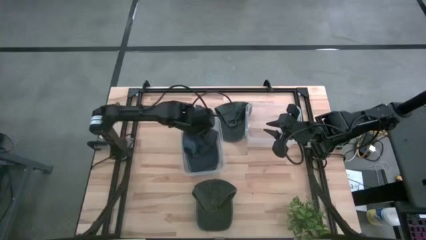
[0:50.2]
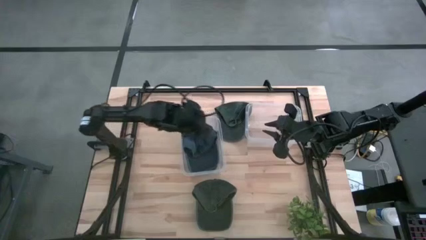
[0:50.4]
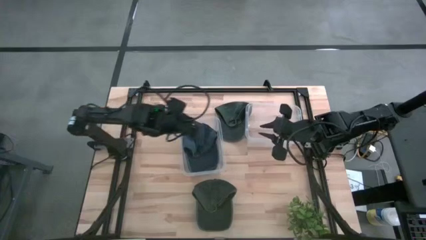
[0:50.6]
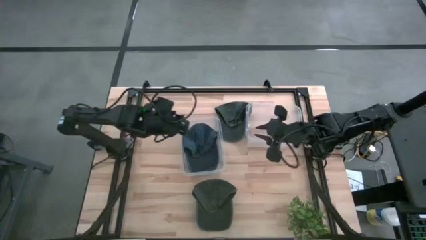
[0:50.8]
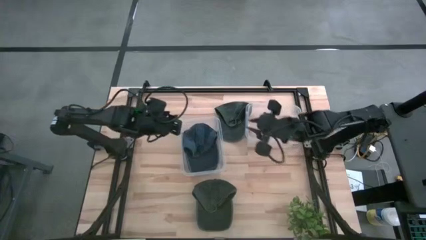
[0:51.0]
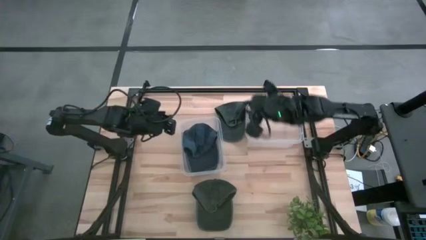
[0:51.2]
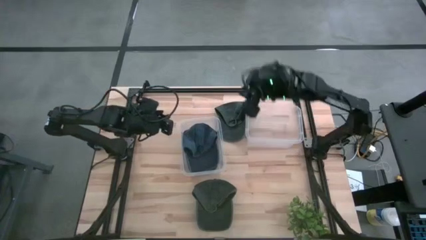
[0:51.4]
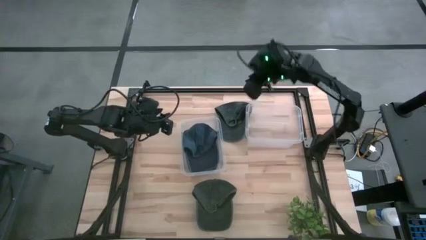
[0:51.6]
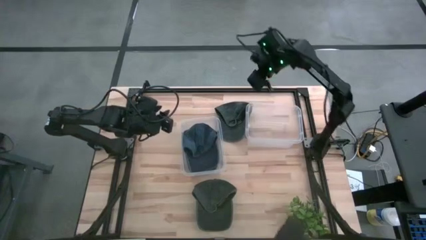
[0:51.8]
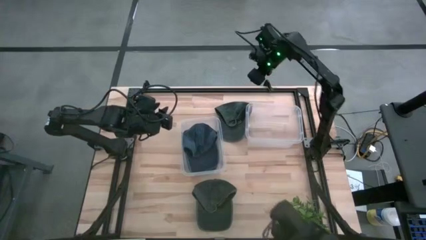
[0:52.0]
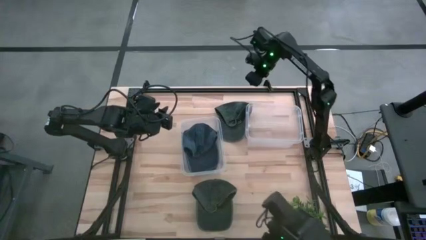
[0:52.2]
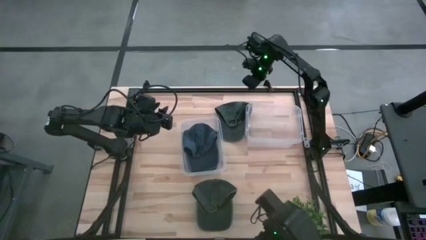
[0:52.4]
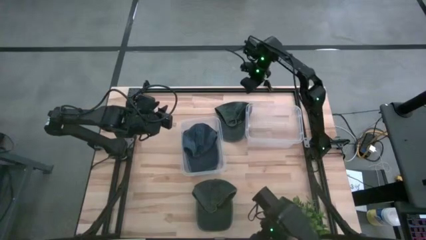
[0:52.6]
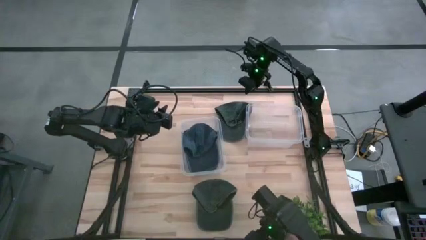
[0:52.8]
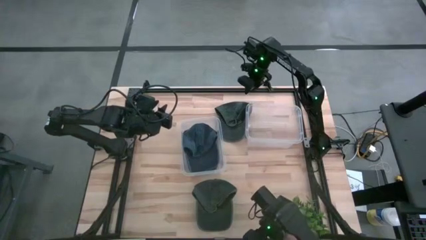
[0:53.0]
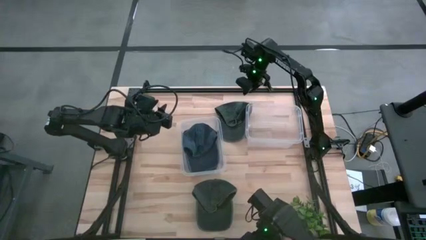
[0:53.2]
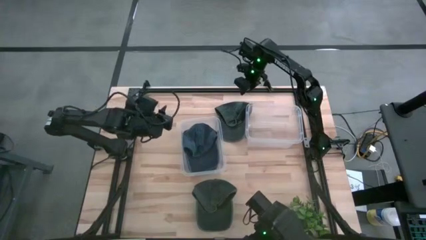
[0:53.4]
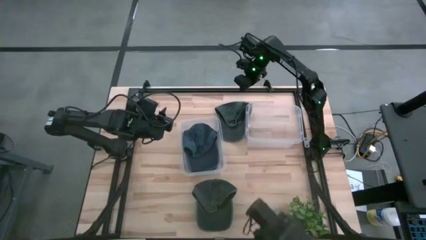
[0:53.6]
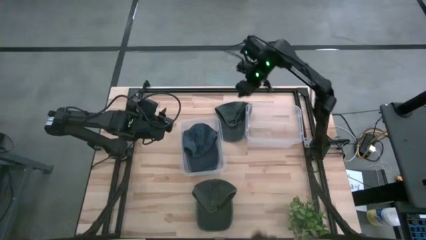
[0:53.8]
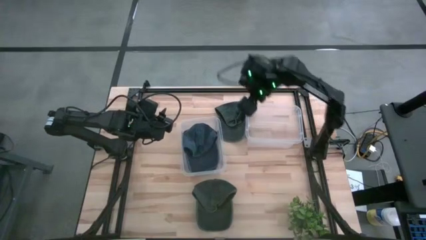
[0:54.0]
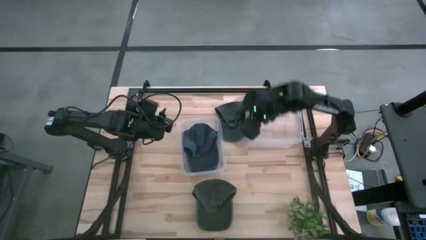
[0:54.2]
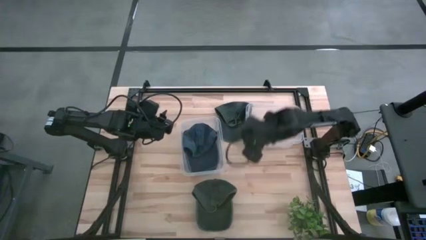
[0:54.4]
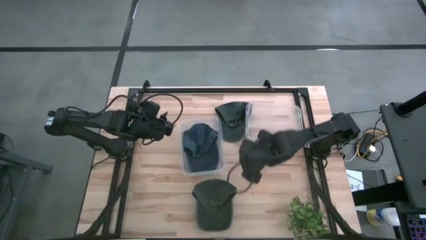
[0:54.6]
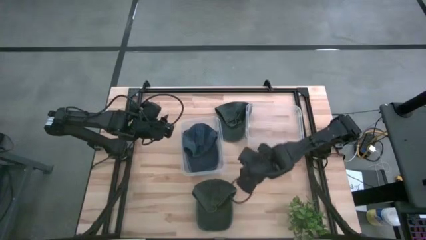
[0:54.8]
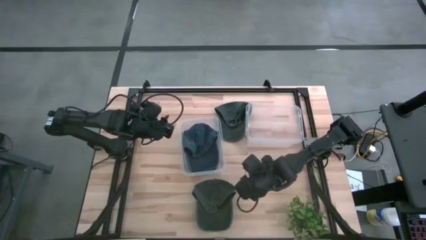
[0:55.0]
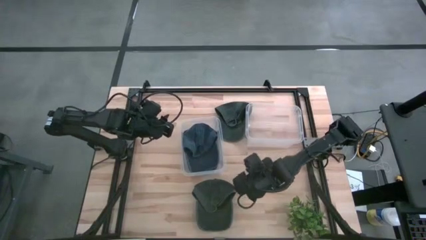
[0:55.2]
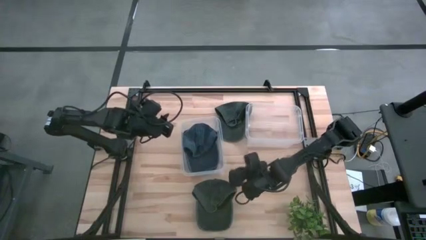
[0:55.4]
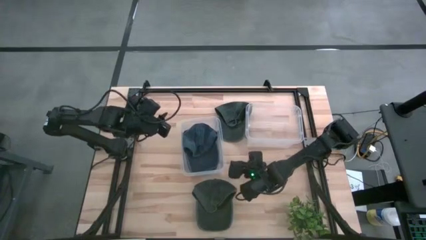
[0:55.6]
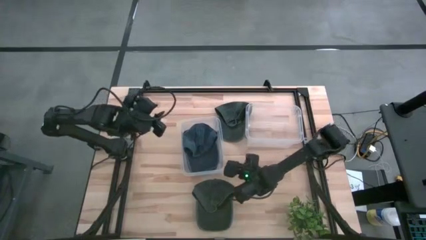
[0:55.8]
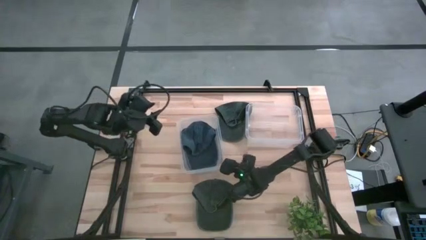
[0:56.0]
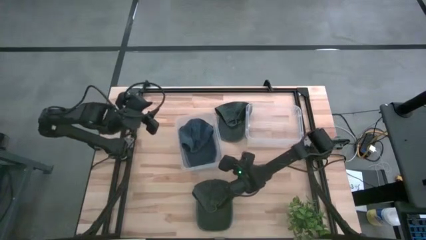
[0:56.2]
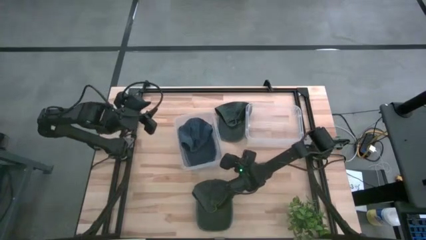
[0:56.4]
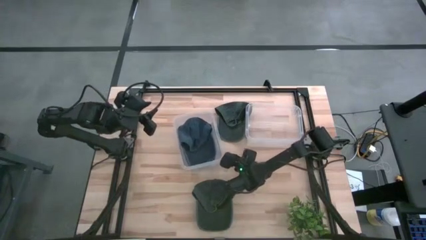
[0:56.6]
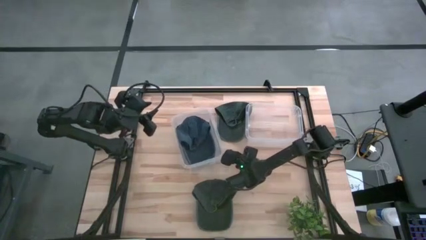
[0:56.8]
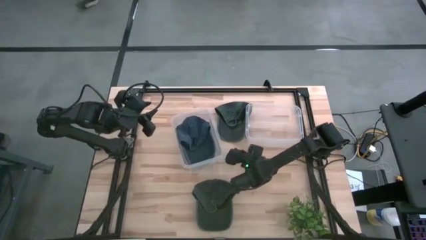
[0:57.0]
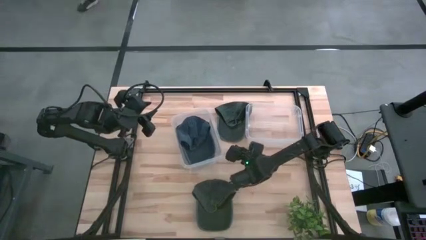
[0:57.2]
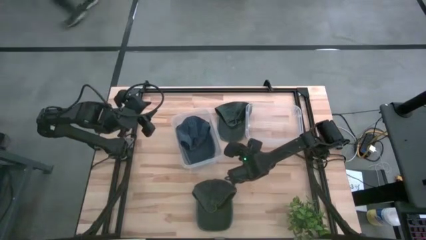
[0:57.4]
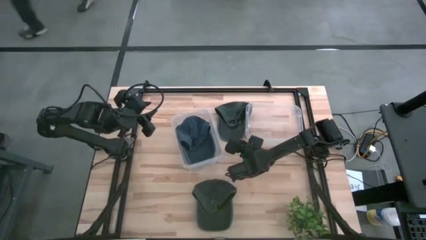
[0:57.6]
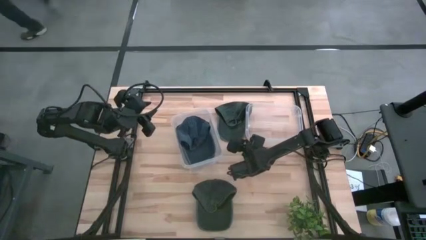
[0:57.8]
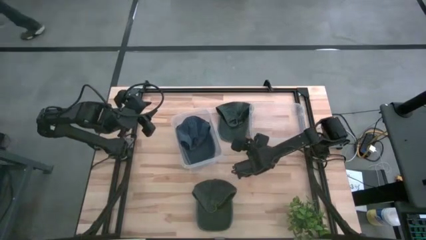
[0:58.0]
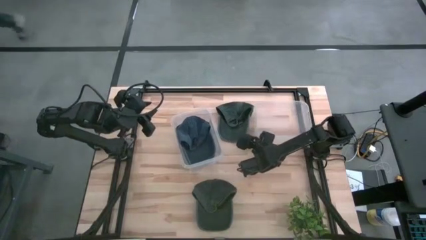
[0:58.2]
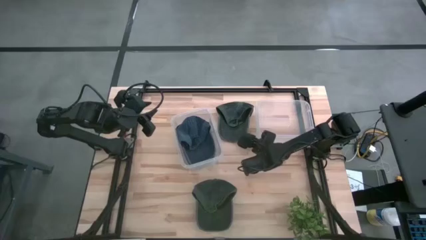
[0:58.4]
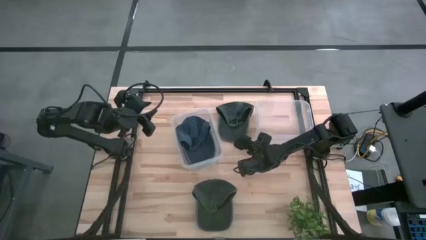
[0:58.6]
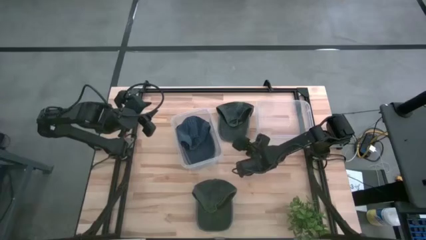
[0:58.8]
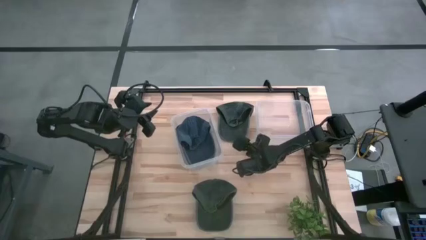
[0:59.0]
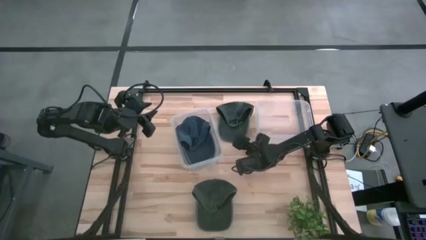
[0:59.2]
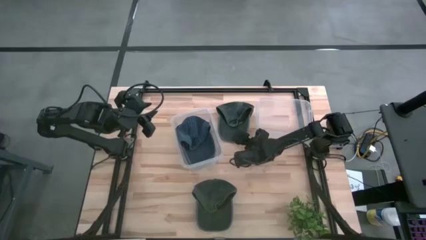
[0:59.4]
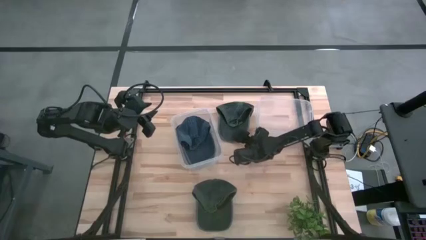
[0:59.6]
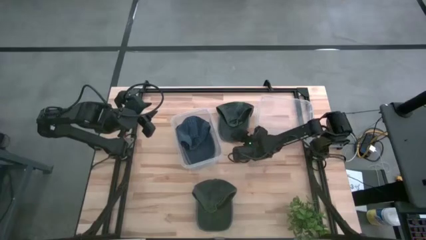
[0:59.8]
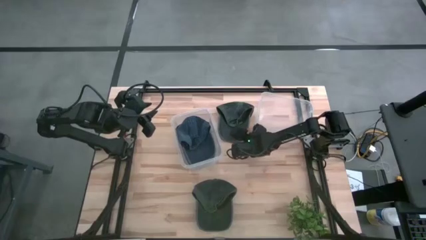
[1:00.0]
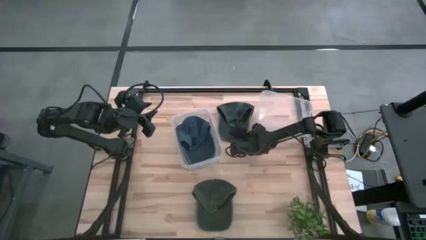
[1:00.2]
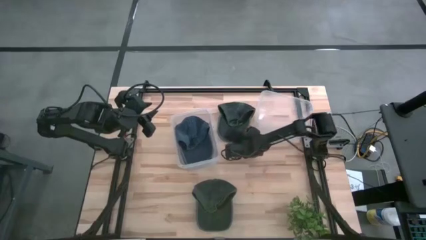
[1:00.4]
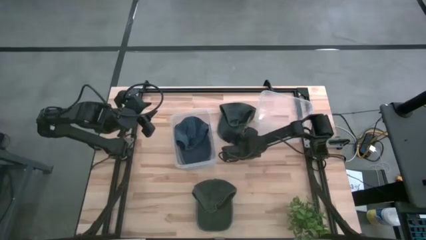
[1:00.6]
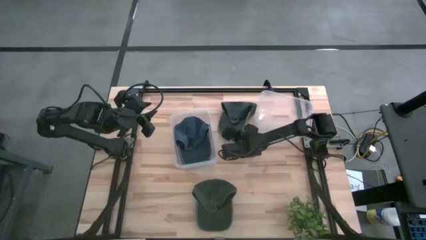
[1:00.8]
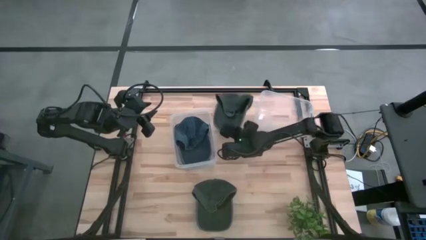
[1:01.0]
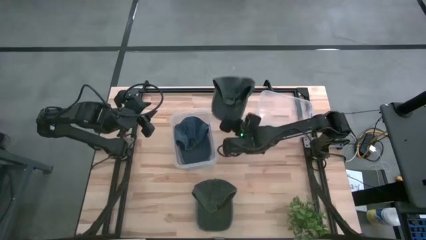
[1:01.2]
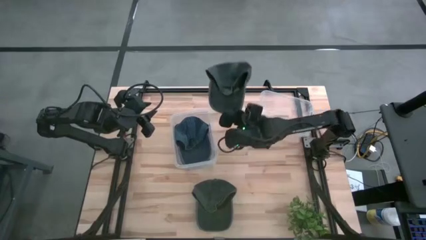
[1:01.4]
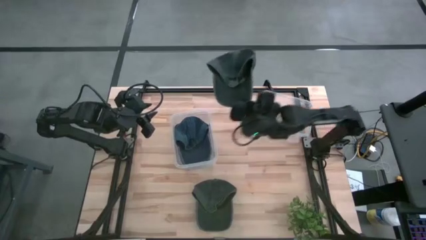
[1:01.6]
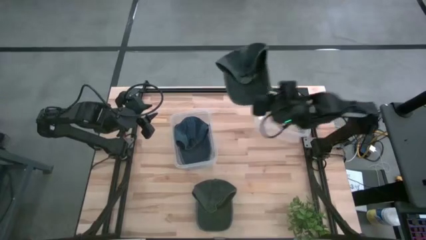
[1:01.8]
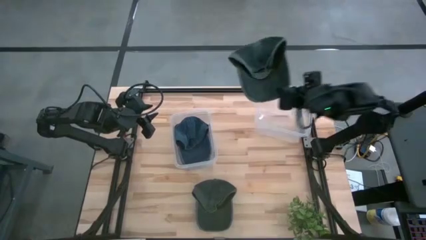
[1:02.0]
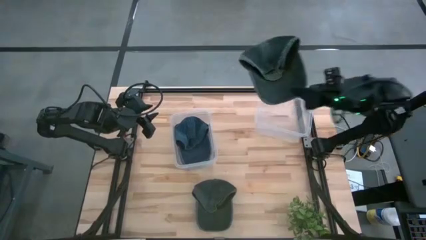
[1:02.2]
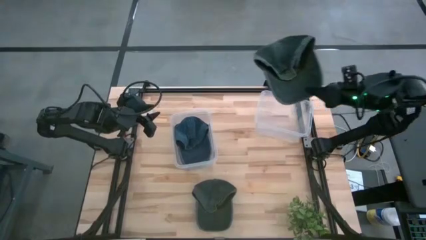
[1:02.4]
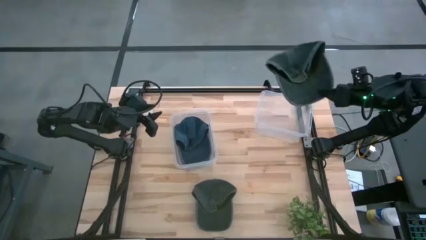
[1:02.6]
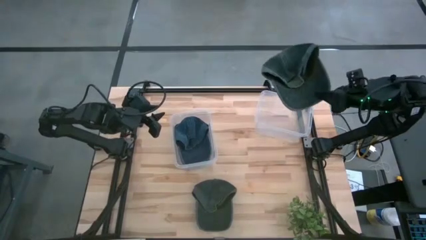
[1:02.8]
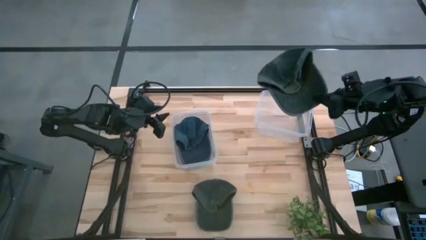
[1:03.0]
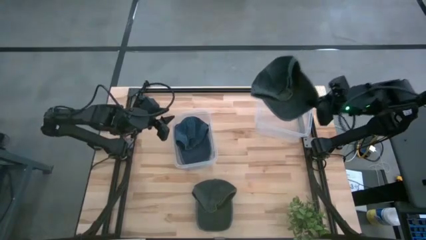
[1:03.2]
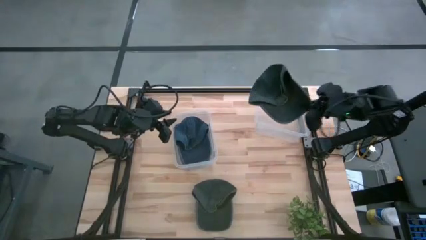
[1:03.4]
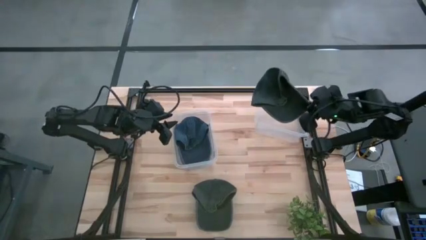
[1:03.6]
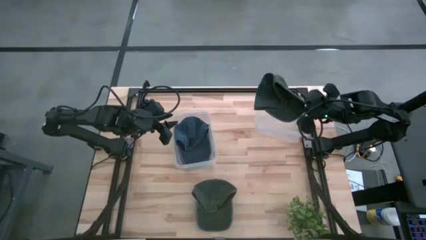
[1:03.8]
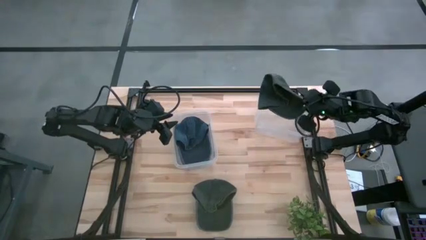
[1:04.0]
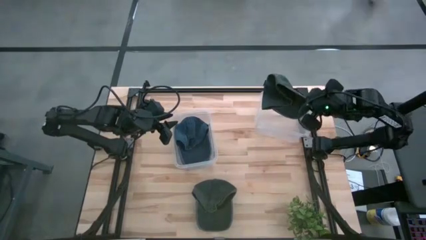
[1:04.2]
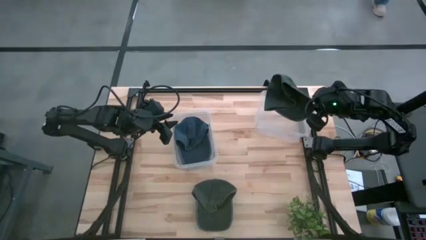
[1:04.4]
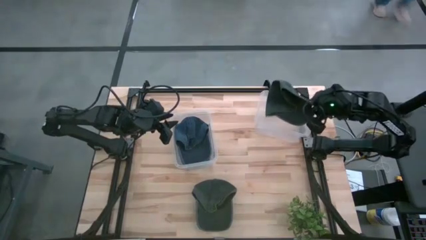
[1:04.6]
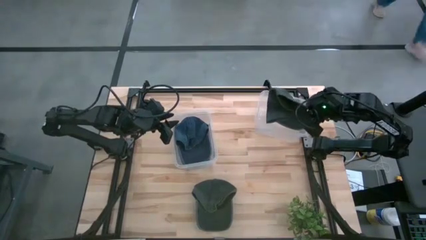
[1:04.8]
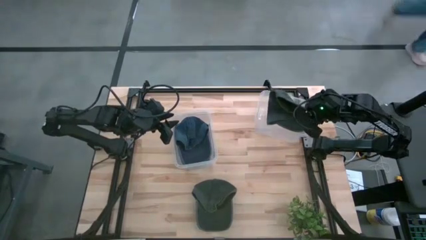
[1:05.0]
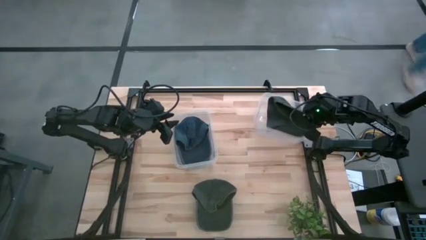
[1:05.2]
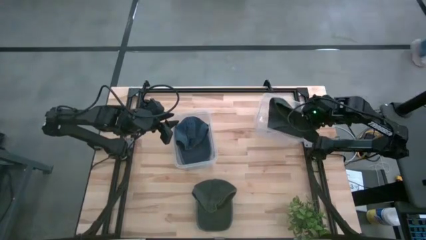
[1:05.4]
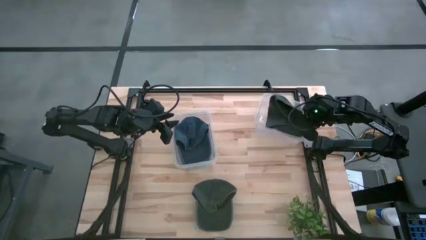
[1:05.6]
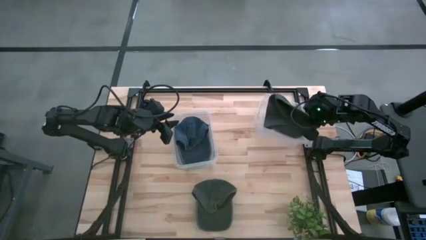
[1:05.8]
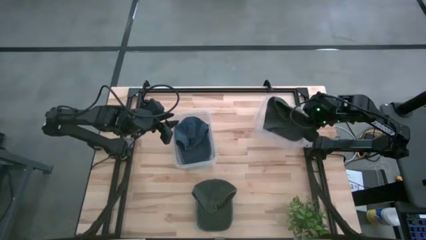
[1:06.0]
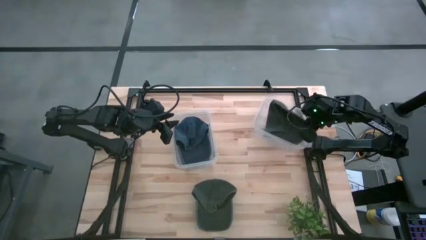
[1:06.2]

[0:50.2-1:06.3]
Task: Pick and place caps into container
Put the top green cap into the right transparent container
